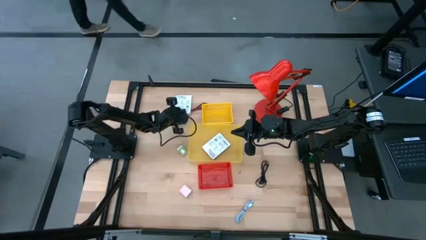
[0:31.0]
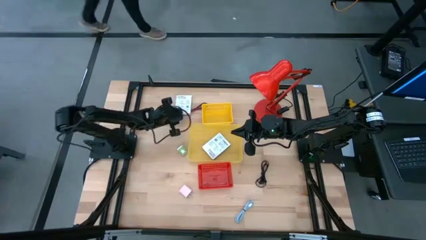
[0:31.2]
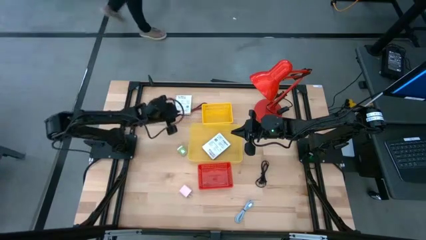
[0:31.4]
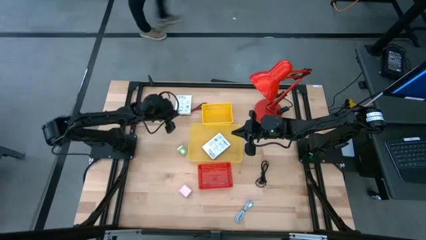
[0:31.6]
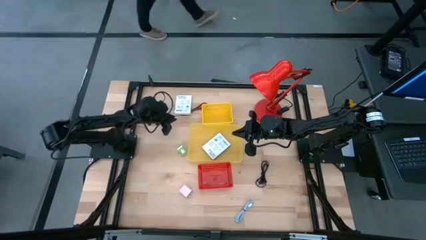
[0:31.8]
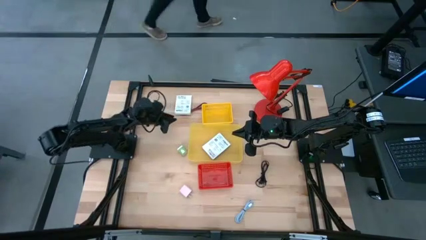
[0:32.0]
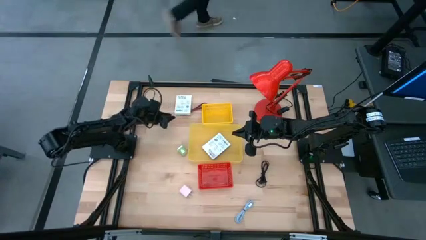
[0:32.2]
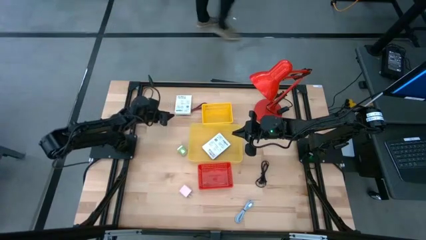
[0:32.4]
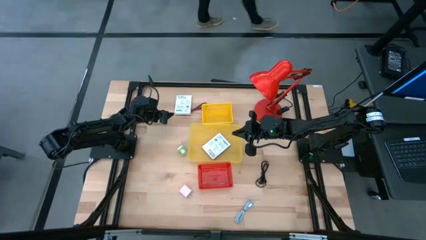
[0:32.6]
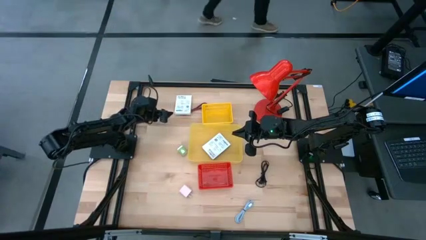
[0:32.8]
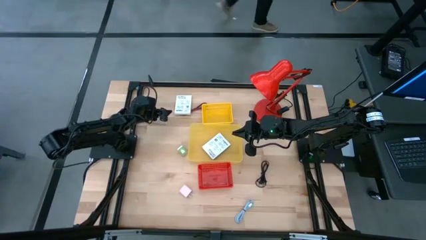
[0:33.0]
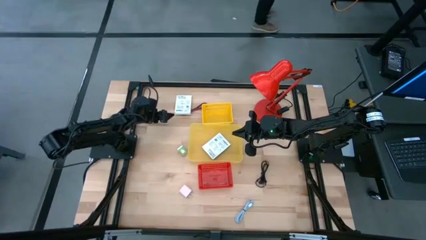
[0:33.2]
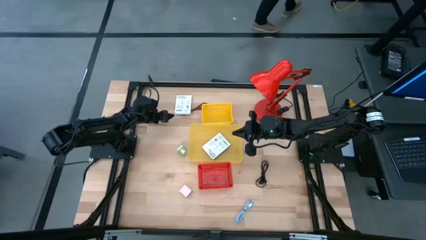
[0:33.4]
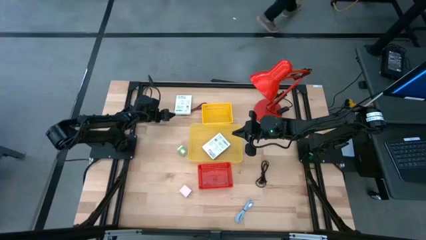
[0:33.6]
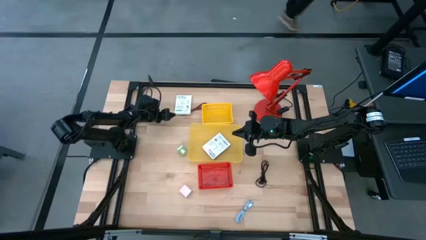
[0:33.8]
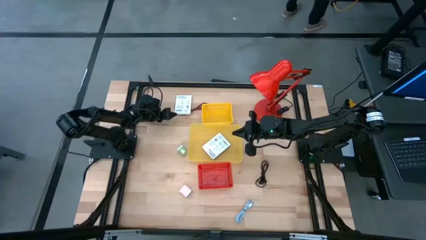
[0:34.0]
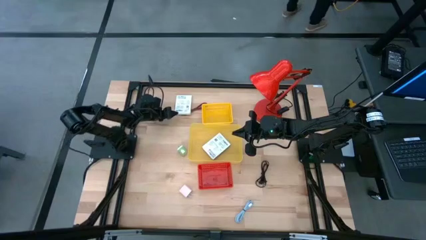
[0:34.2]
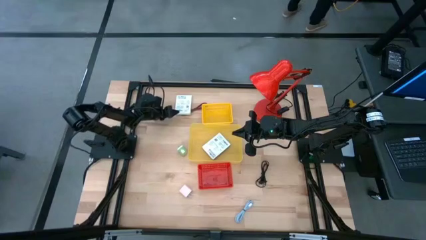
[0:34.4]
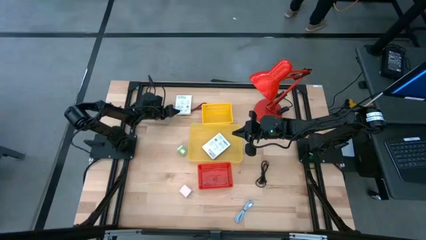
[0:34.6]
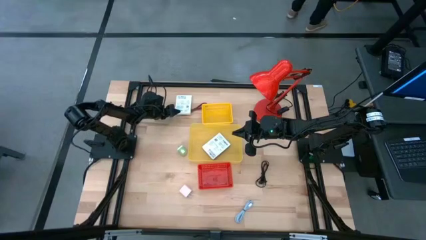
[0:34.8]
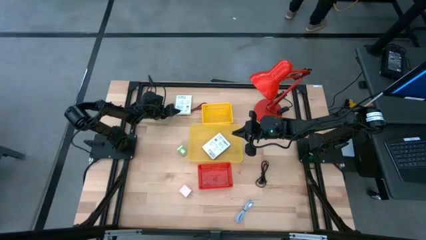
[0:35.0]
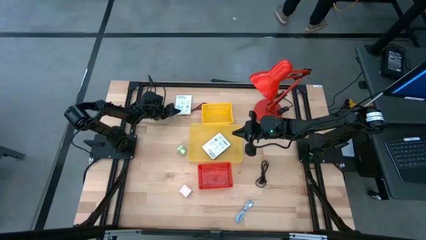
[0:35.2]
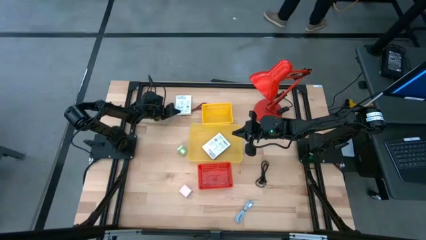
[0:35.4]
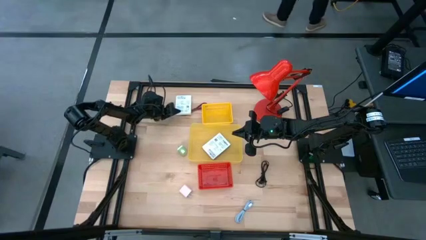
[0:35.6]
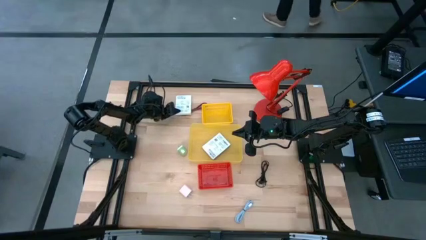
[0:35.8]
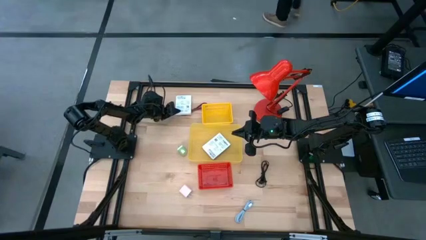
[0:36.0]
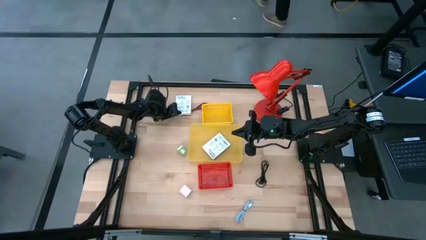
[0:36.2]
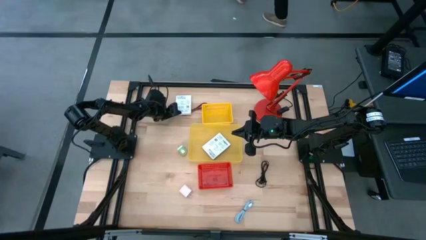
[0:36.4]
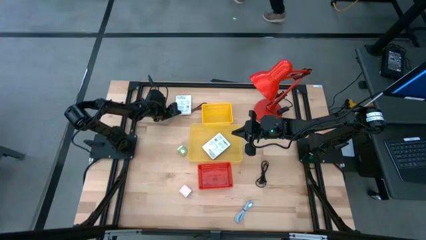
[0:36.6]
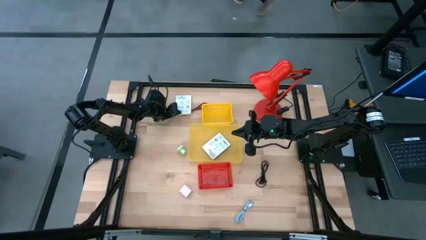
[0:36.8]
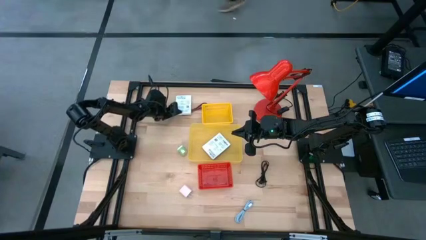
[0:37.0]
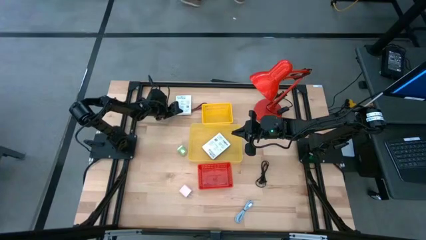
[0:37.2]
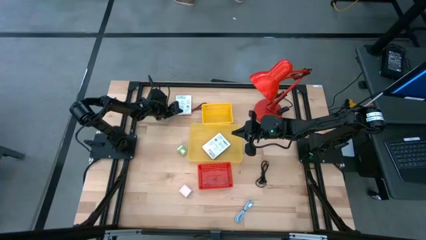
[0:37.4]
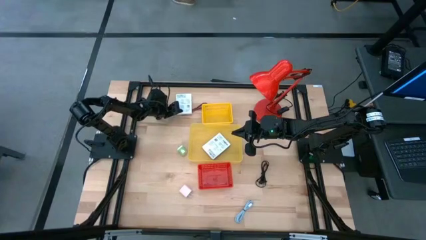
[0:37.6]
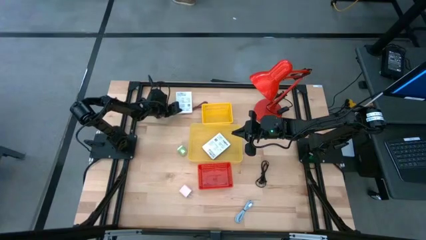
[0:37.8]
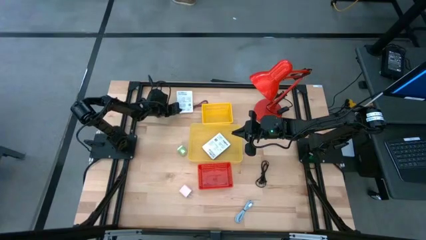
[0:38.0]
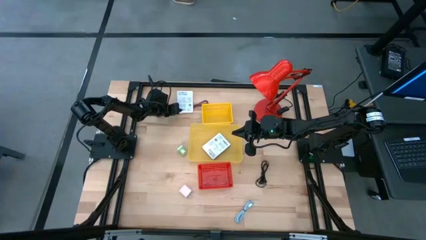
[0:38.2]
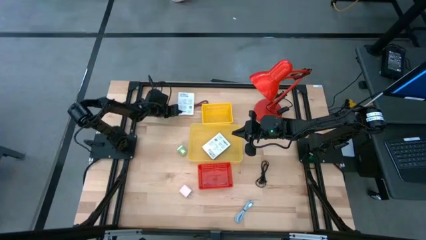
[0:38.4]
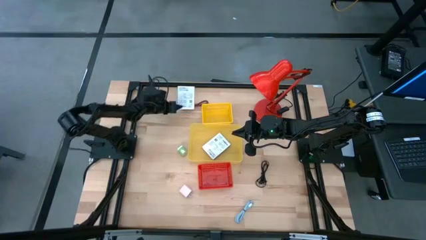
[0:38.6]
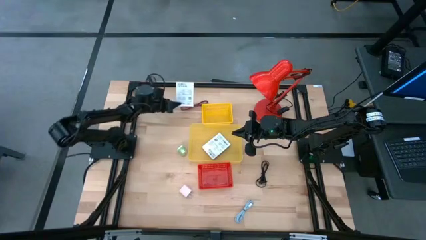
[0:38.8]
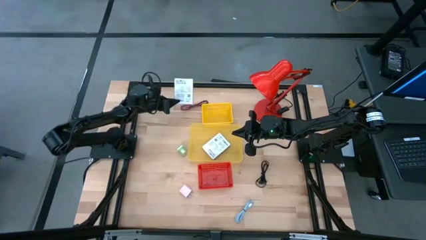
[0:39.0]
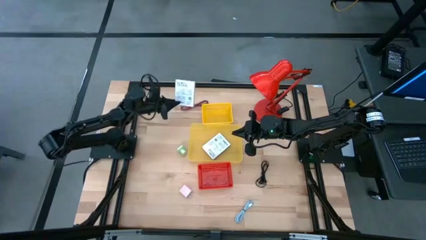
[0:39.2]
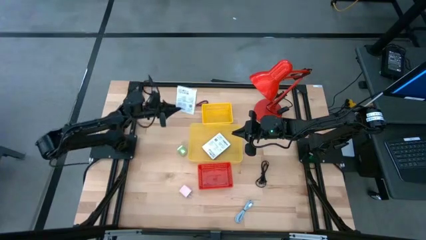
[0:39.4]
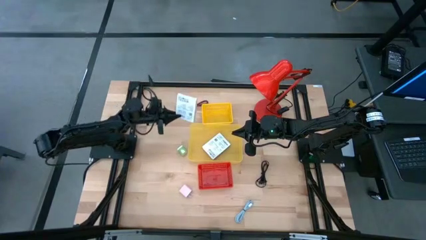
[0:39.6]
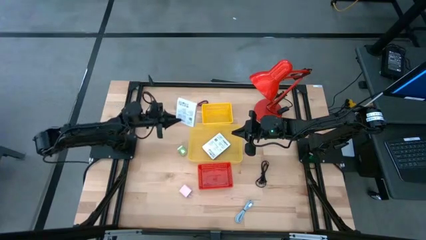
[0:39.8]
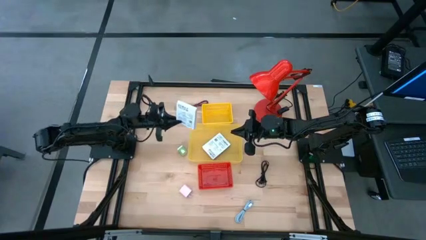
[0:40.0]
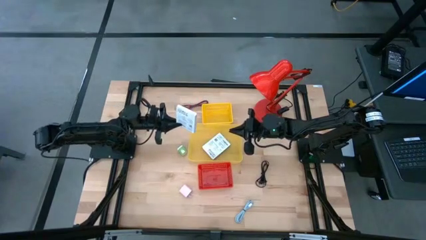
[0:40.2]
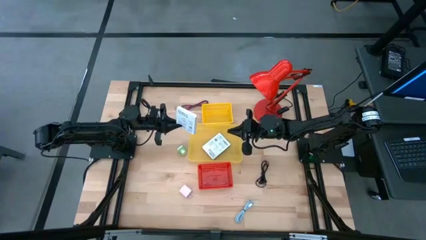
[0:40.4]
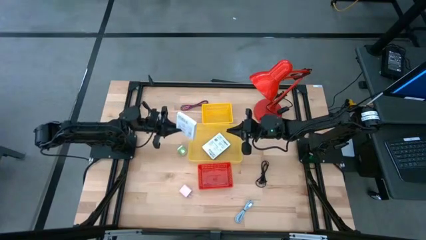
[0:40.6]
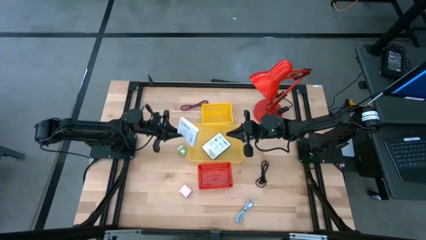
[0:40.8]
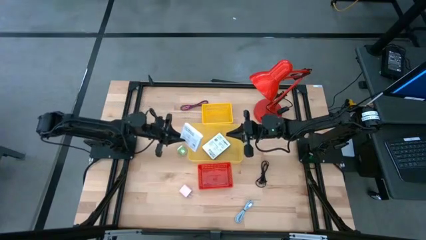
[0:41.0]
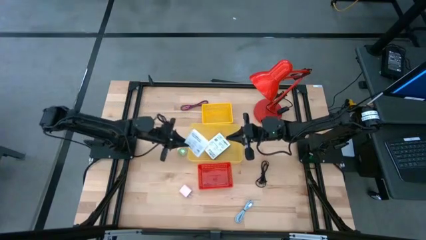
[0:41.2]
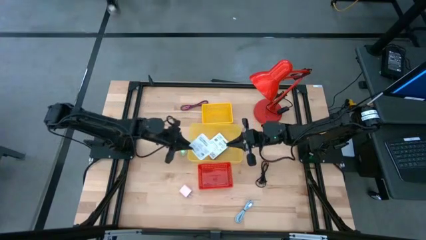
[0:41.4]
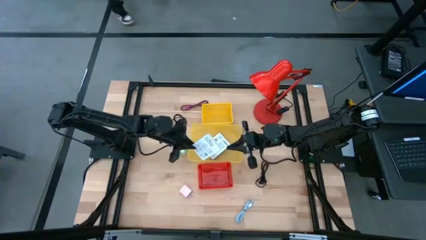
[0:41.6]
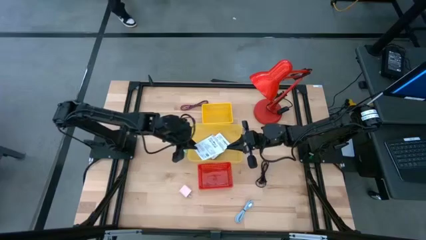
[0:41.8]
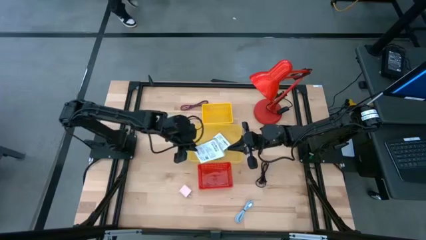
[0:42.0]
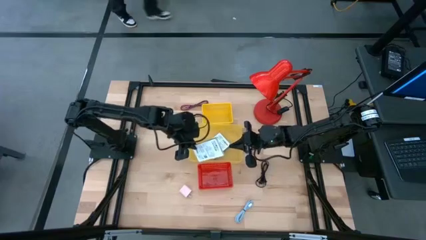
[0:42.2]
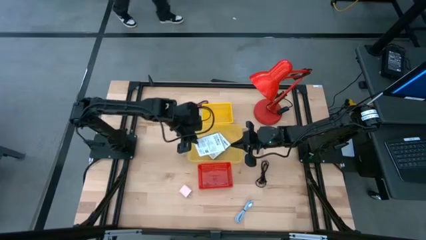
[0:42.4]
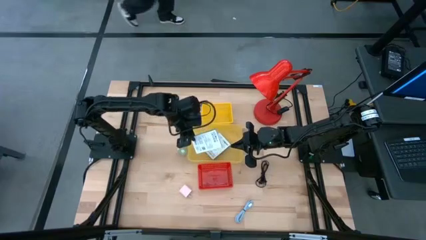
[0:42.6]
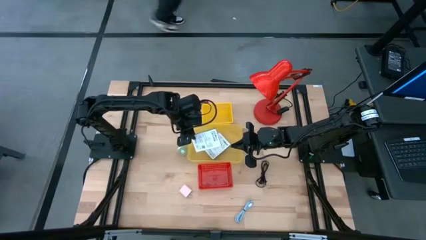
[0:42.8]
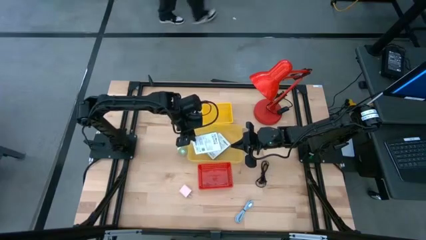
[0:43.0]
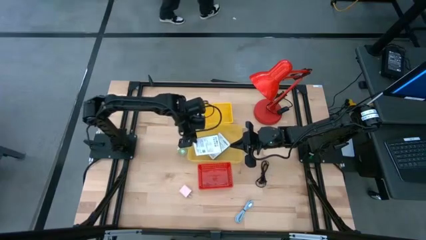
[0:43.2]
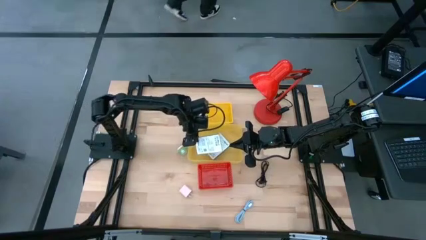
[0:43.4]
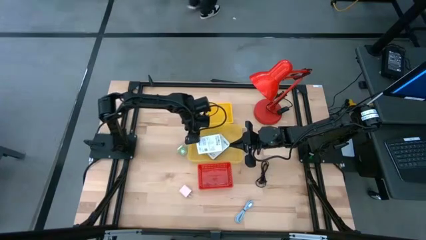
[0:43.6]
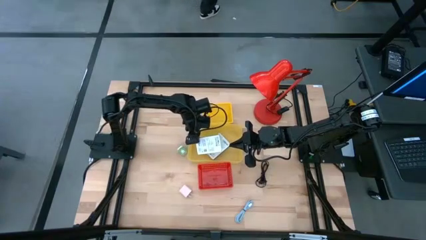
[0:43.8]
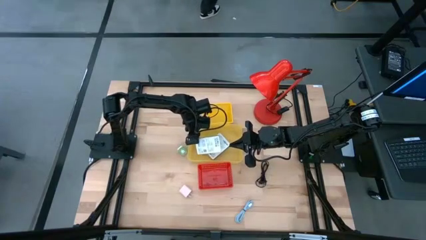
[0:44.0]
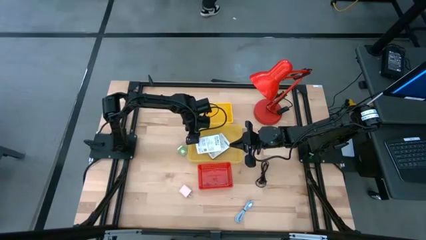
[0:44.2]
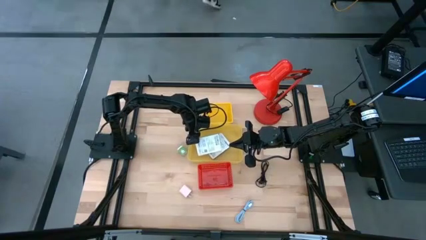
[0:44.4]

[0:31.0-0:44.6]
Task: Pick and place items into bin
Put the white card reader box into the yellow transparent bin
